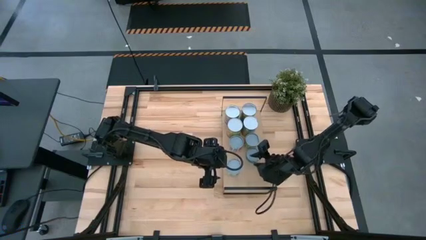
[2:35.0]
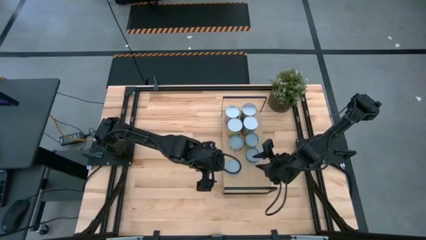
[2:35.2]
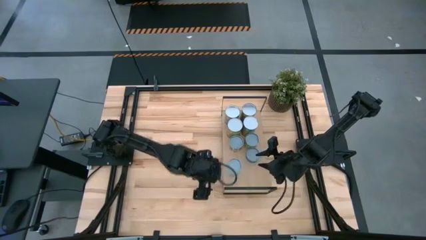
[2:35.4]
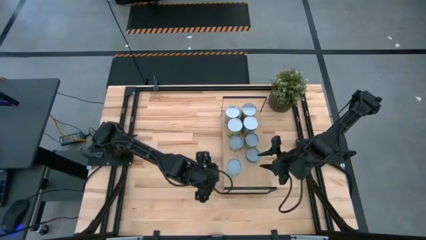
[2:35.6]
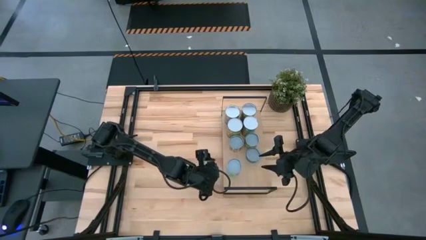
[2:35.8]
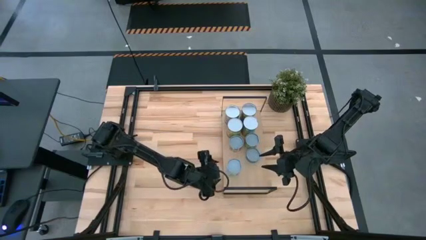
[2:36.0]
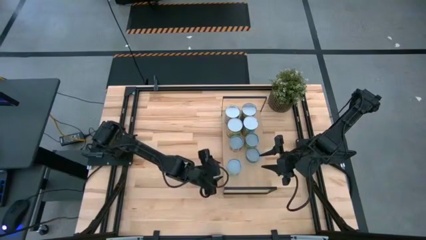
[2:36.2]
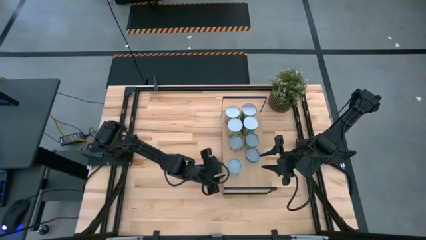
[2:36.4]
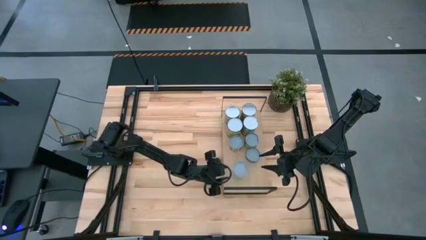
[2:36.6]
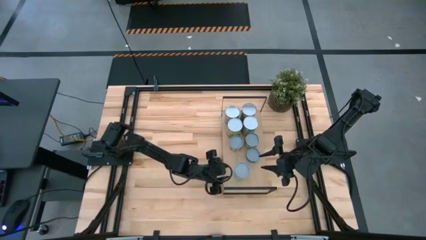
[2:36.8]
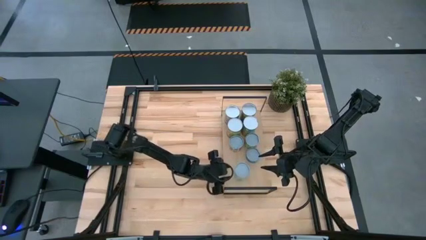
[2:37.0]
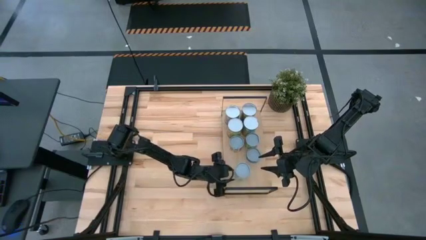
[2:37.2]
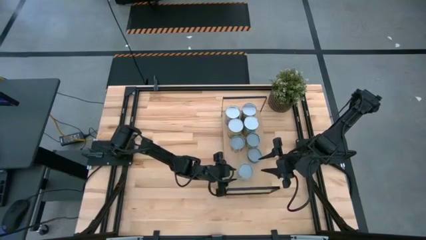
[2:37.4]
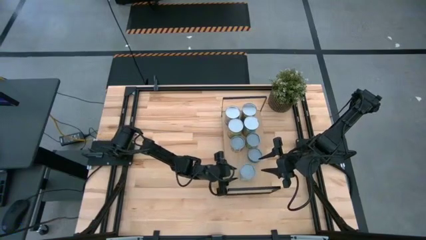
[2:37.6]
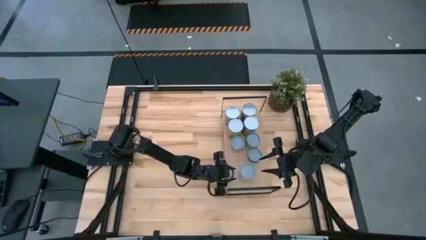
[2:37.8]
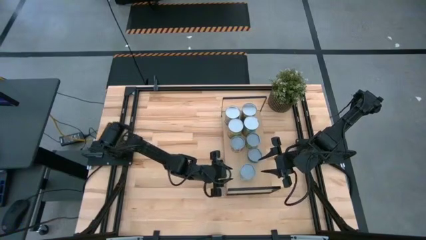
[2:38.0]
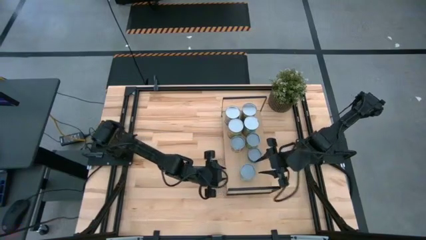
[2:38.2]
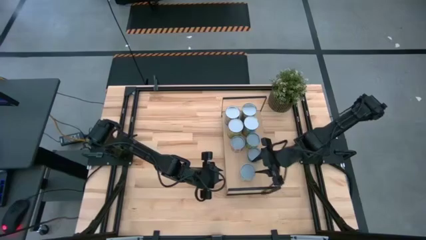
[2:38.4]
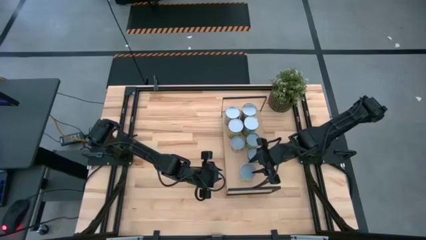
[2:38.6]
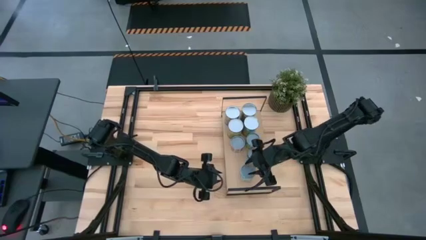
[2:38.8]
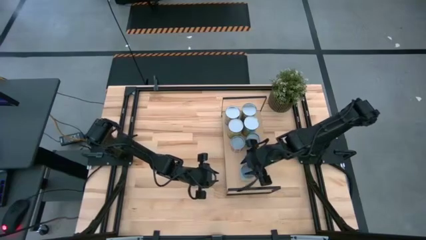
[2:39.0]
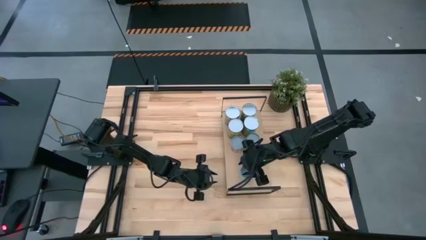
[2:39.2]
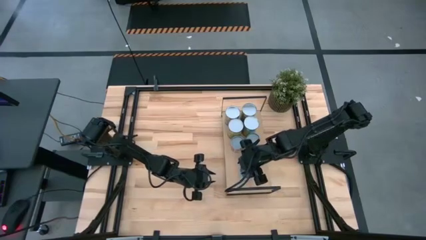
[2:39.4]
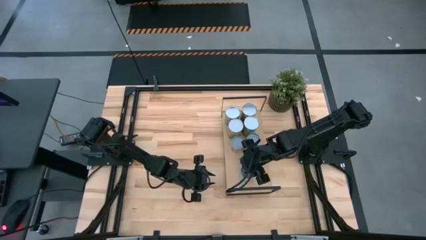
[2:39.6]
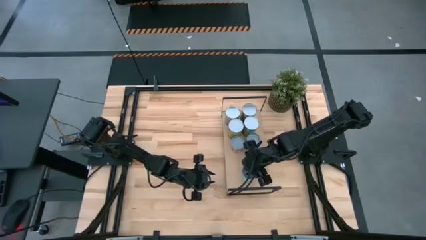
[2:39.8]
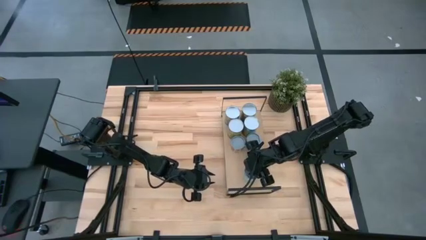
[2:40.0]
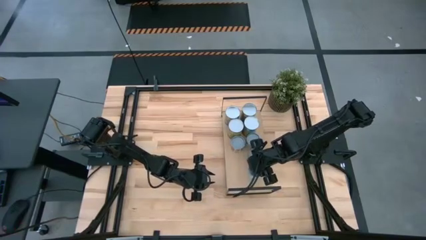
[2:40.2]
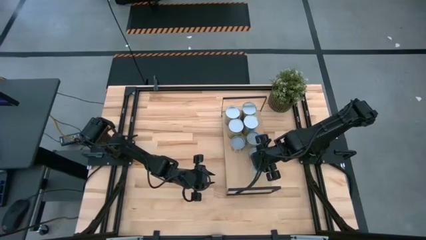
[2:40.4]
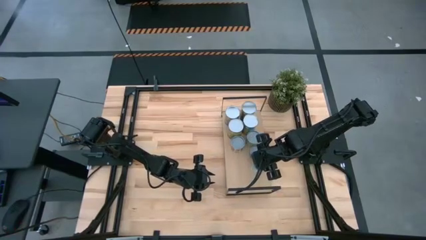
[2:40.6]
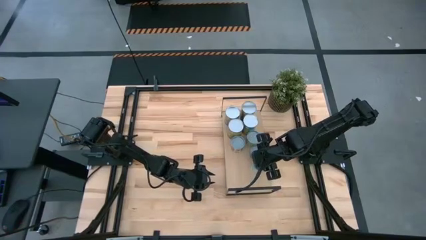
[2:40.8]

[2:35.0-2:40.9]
Task: Pick and place cans onto a shelf
Adjust the canned mix vegetable on the shelf

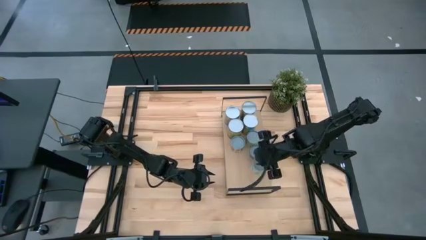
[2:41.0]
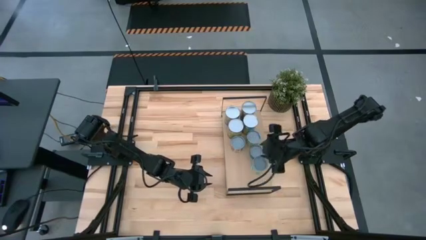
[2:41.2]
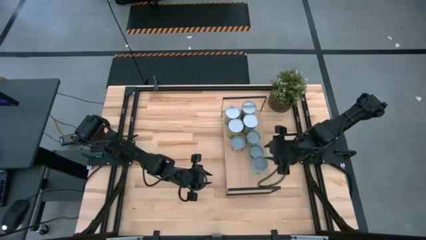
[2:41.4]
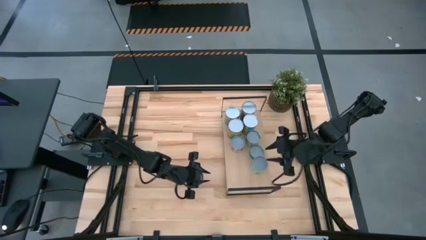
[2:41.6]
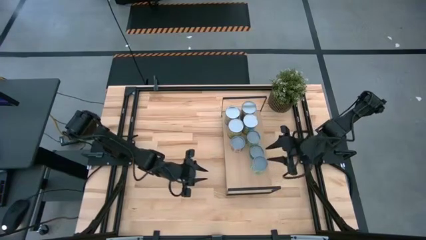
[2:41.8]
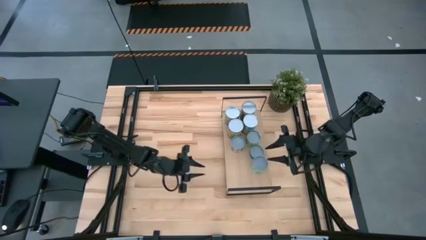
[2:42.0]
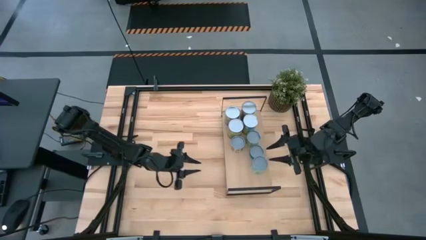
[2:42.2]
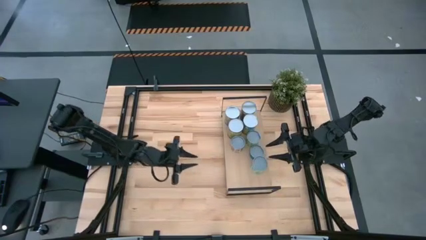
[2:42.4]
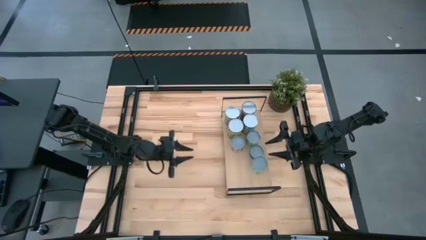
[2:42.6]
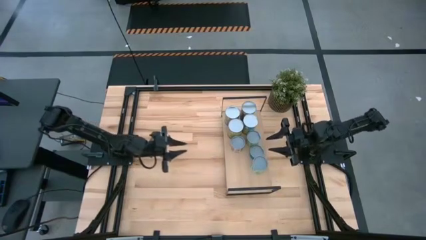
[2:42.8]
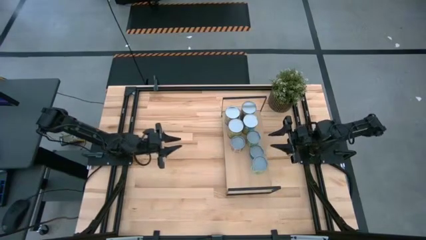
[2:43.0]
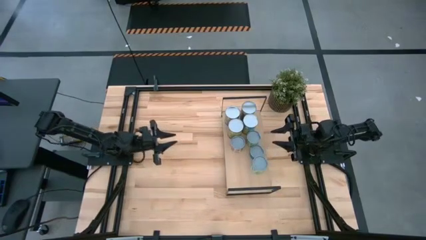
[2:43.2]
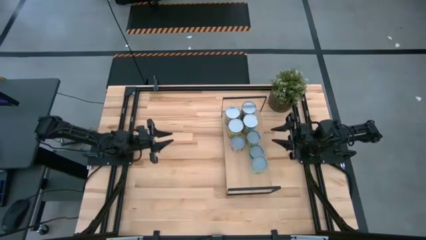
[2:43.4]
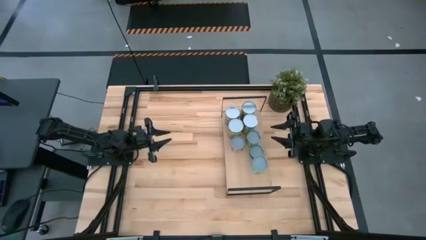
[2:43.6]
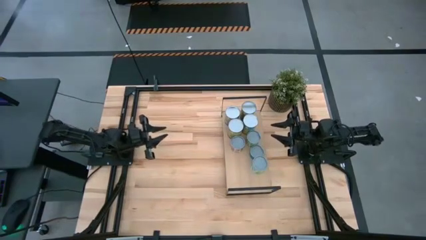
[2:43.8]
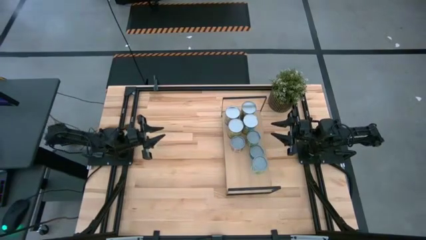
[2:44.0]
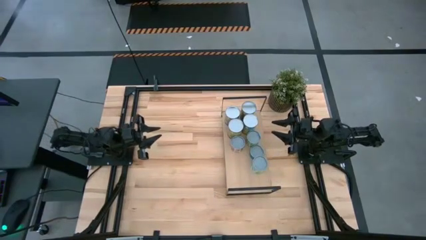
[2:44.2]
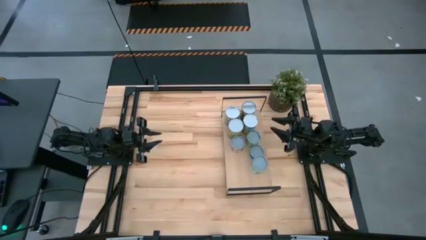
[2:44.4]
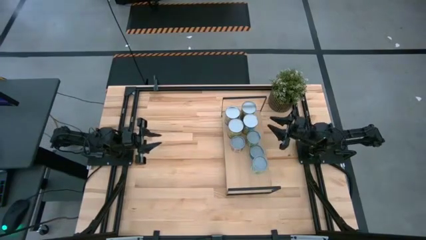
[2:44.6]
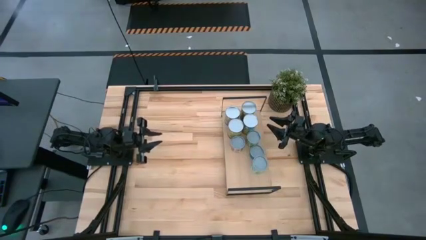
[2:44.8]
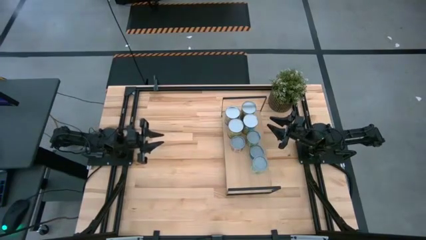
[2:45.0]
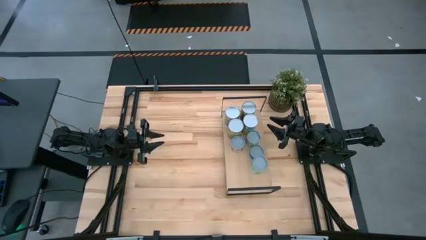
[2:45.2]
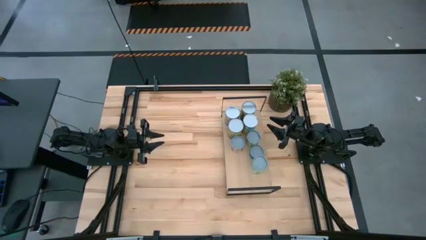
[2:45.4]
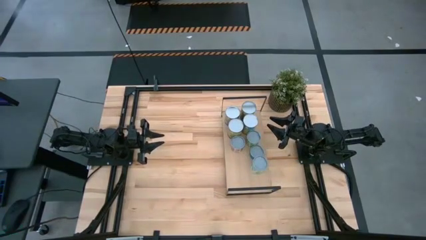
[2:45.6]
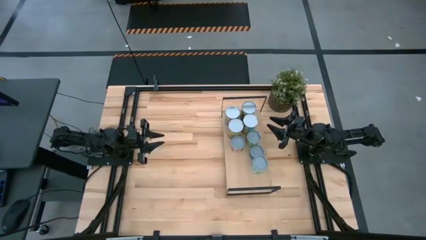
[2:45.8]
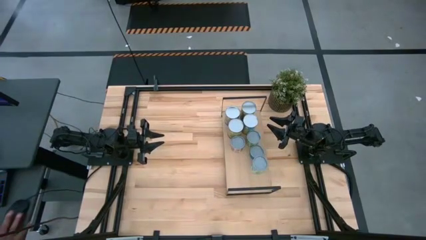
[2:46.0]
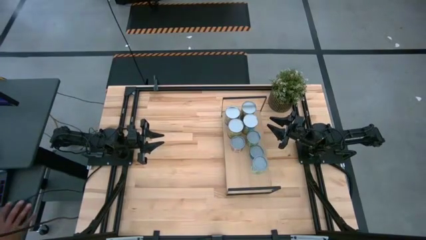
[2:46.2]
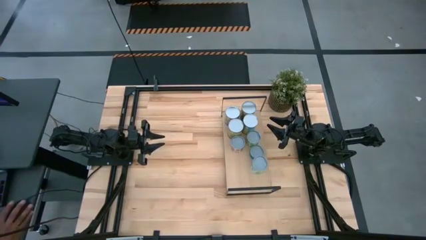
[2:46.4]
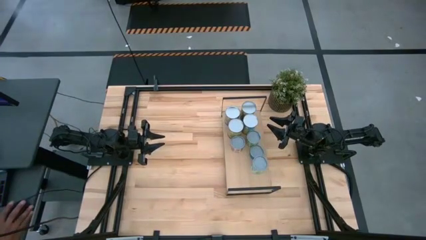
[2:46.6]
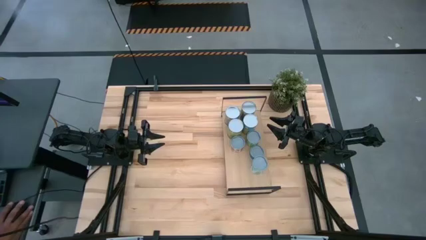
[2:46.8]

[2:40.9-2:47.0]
Return to Home Position
